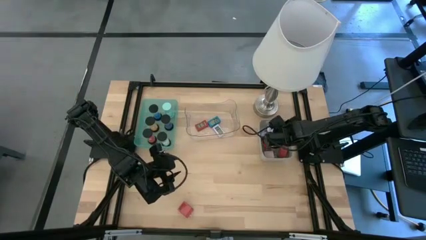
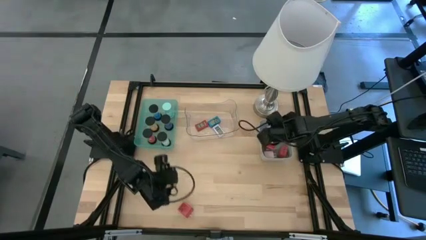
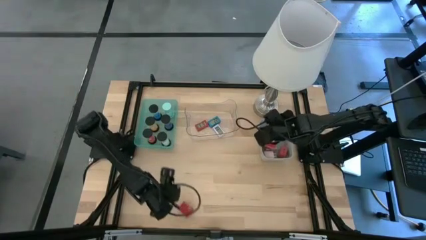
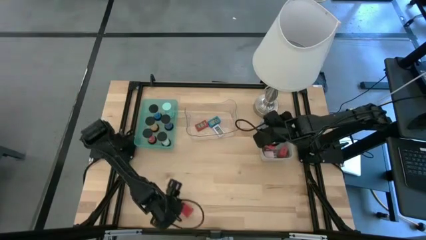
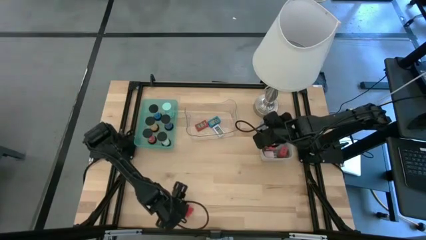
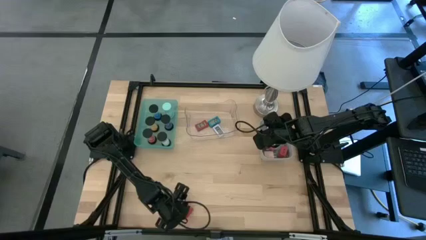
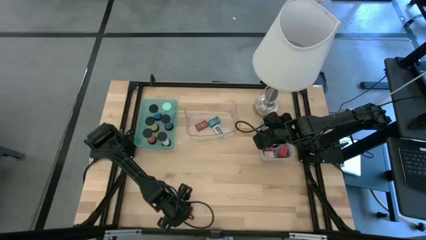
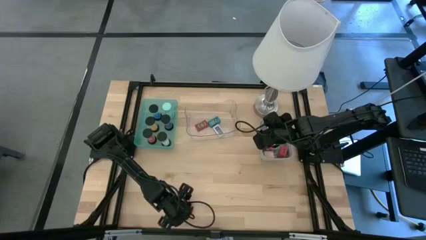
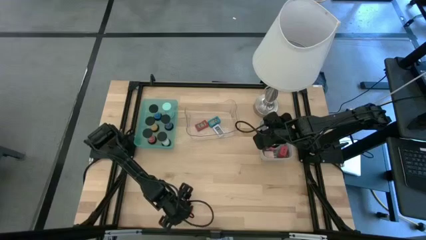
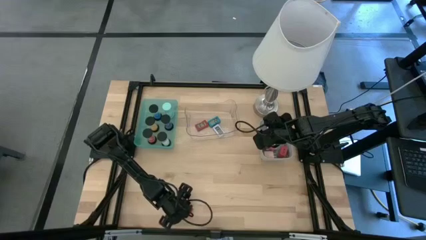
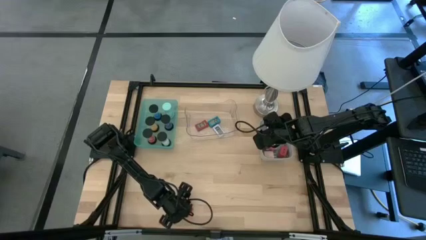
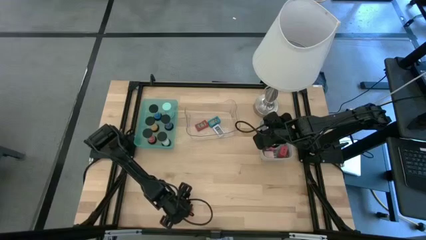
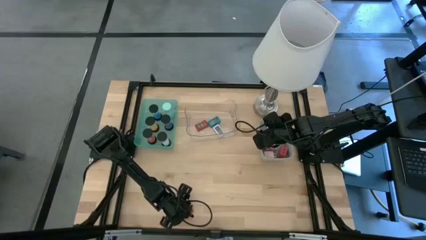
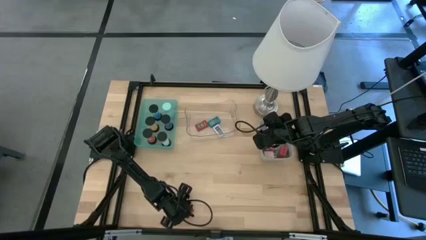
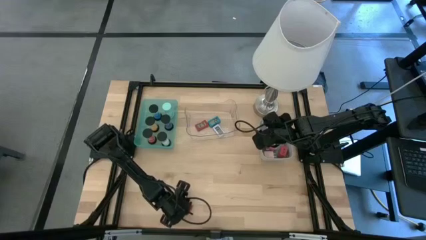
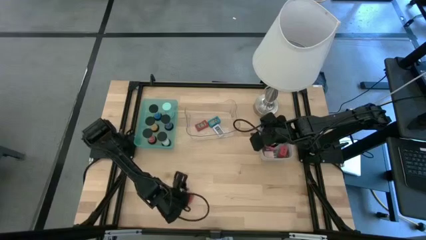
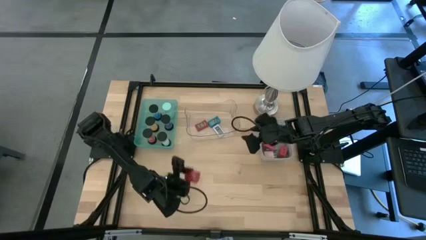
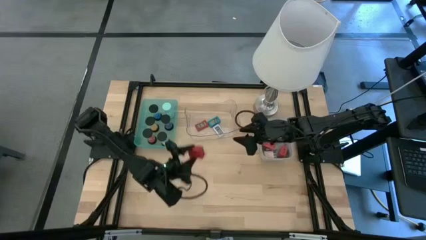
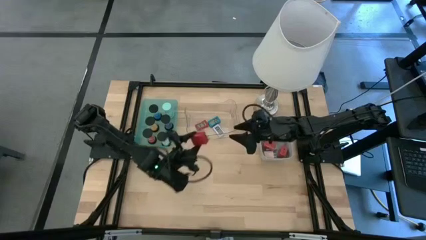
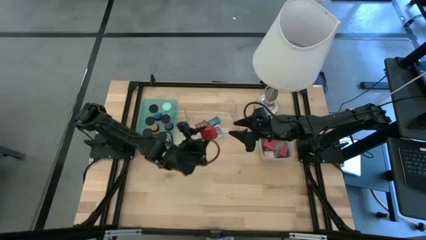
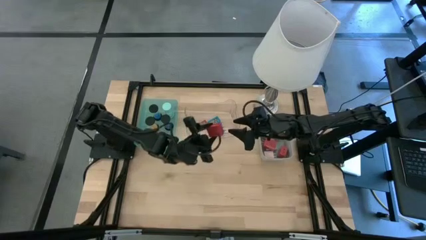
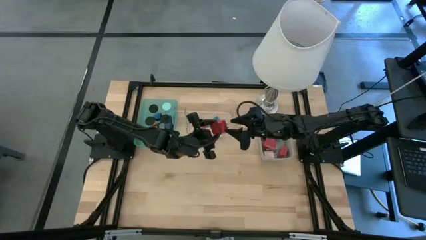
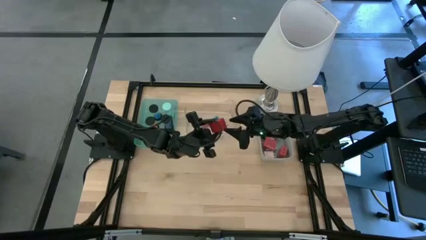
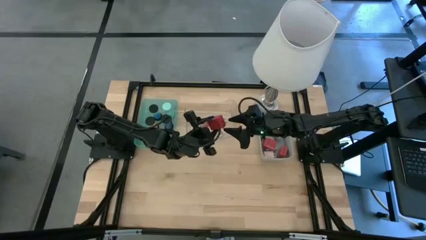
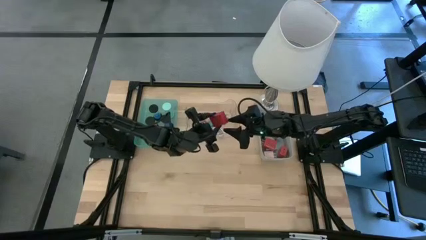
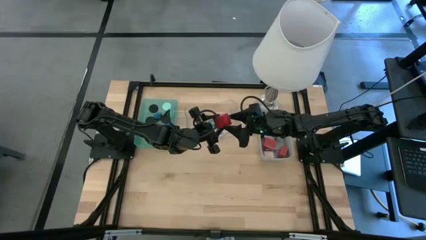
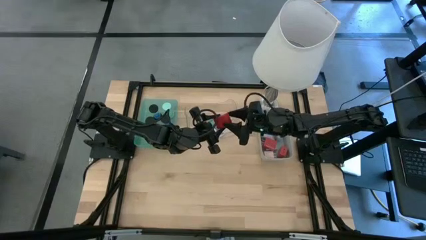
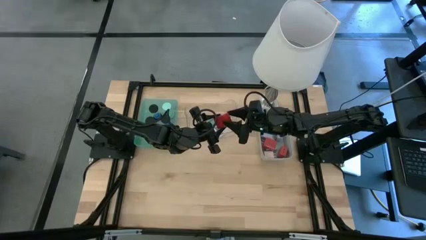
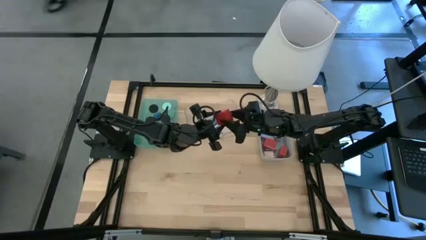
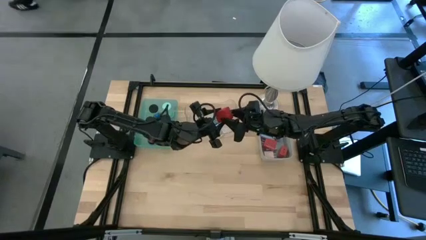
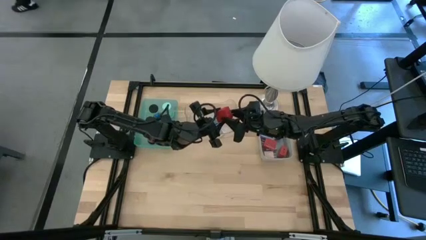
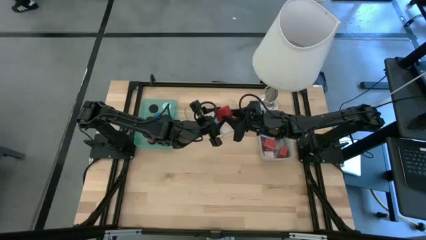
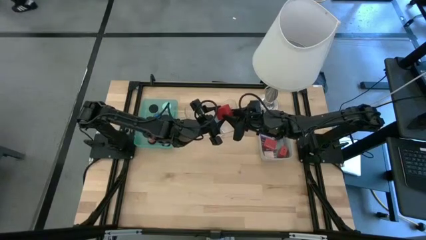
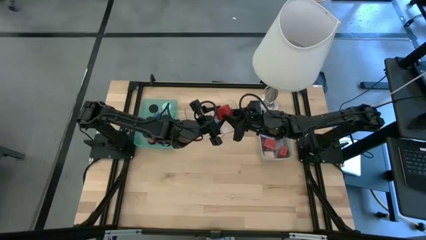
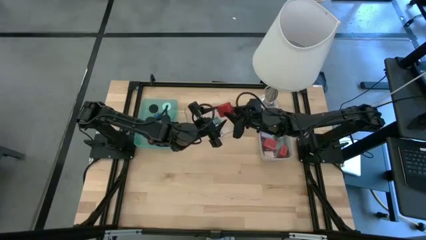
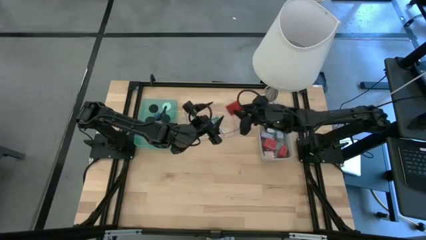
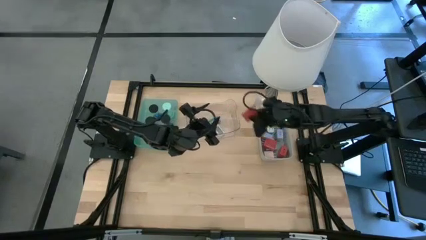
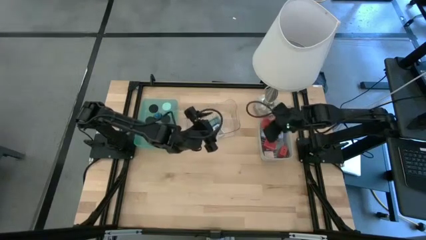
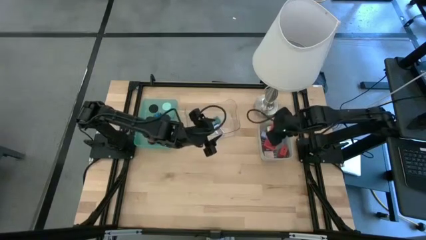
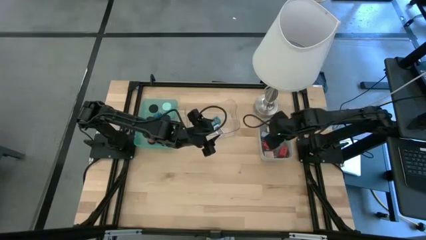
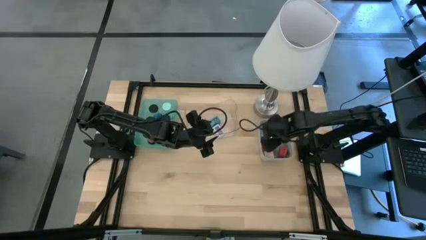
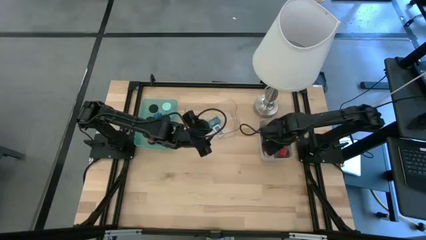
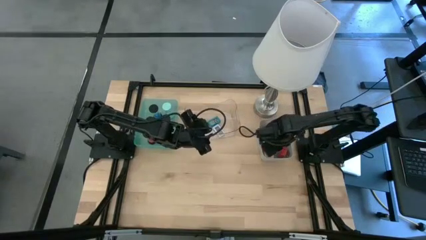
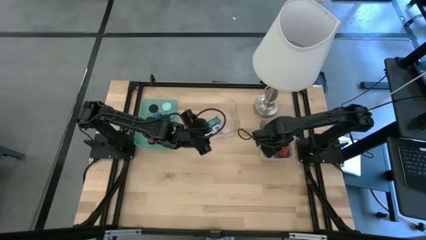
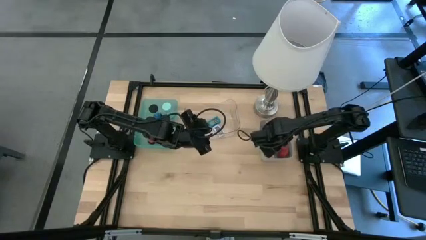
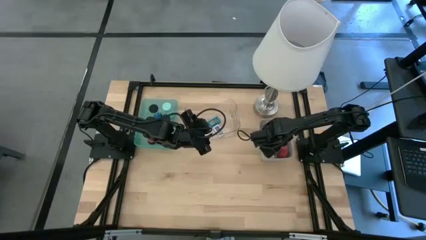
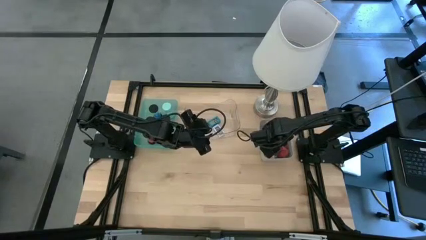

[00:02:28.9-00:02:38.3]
Task: Pick & Place Office items
Put the red charger adapter into the gray bin

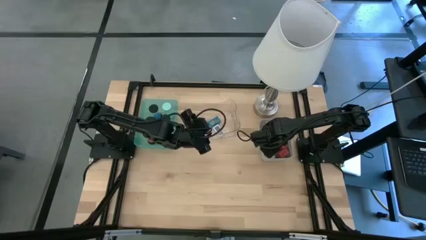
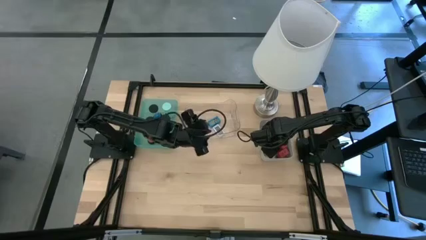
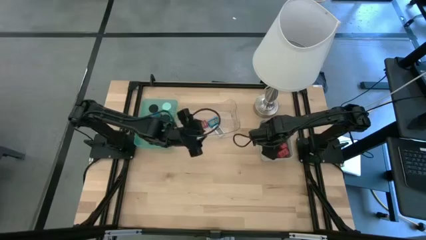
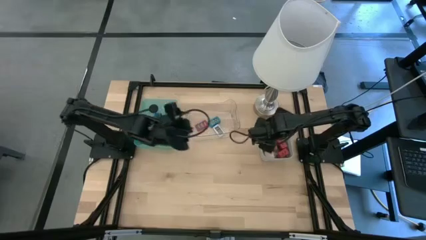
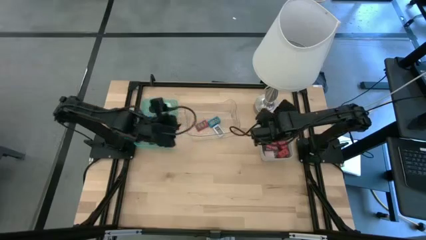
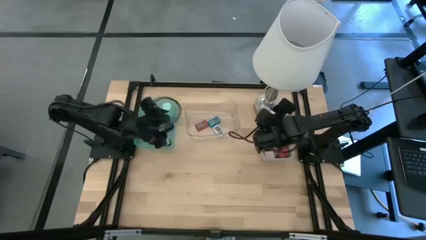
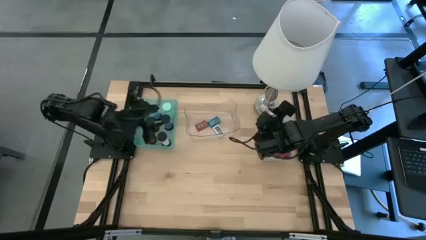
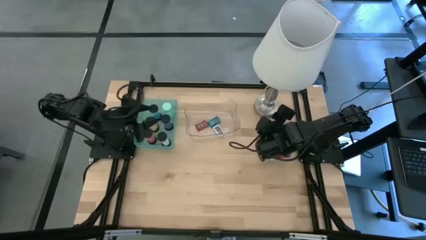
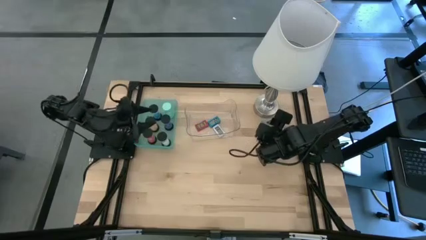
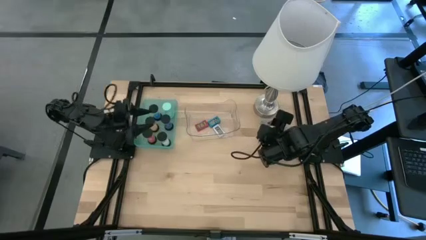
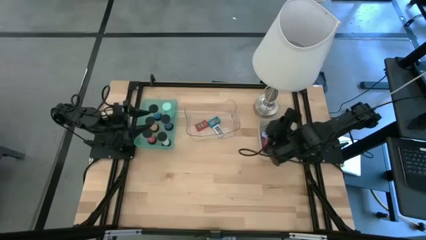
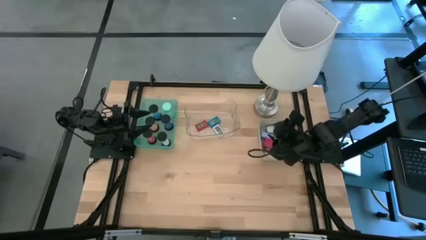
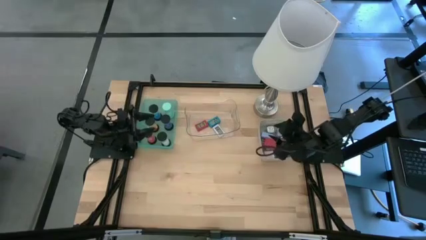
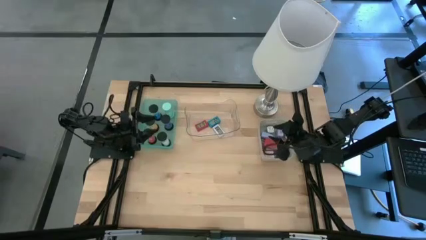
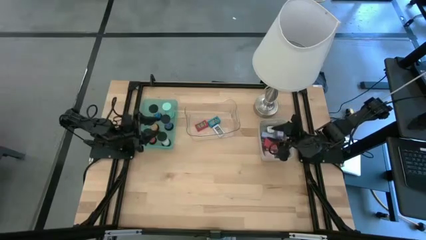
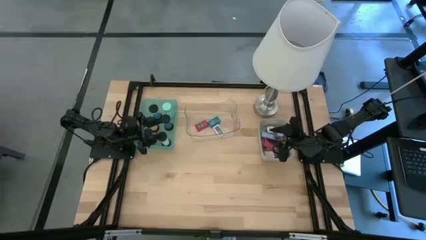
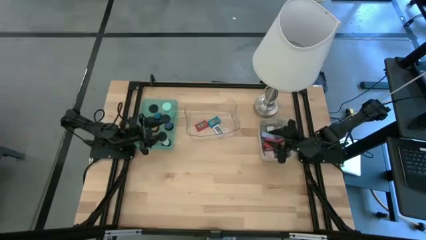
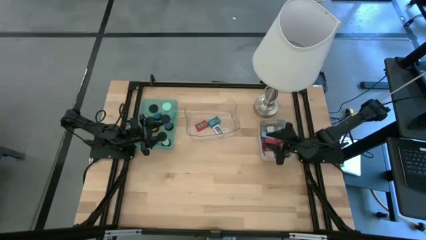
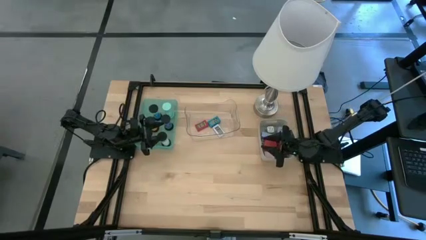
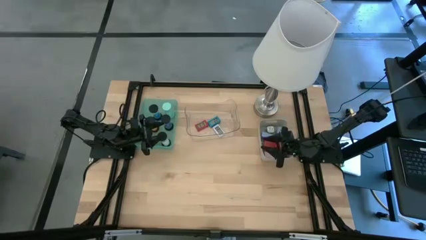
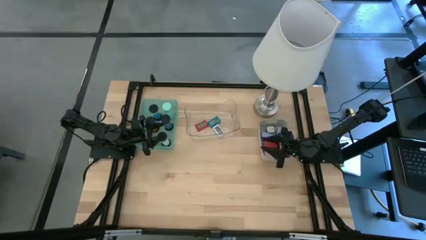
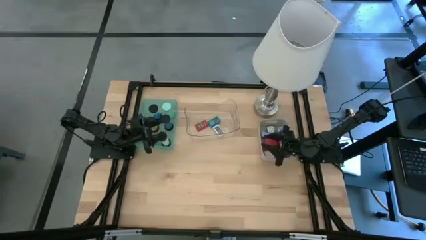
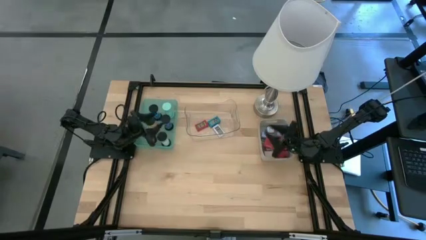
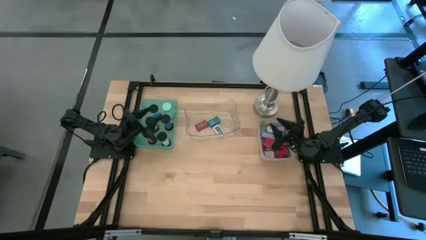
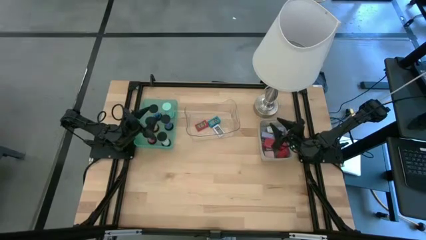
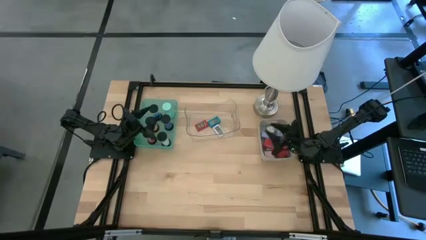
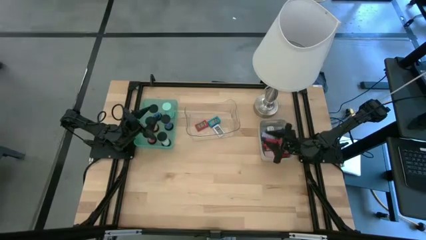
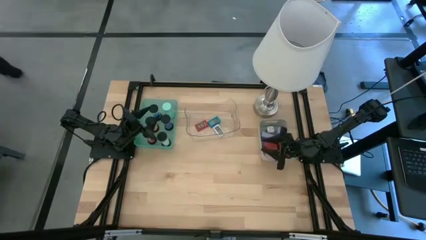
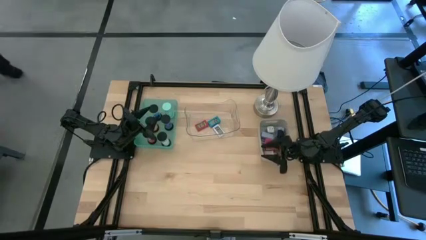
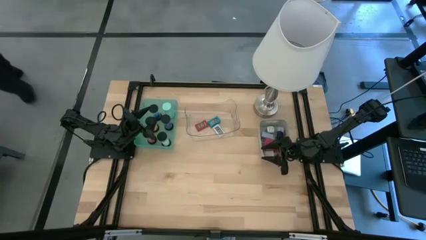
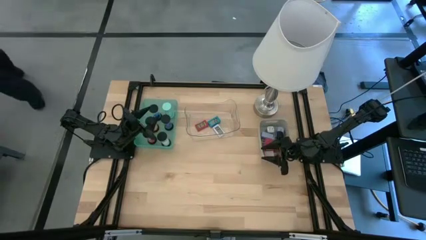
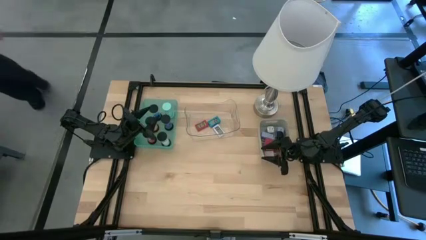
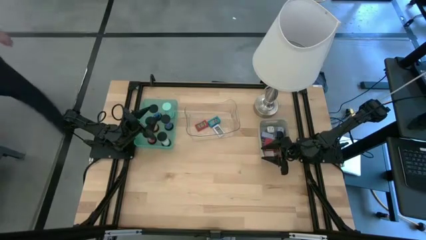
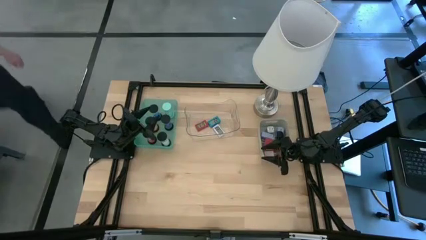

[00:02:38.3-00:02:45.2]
Return to Home Position
